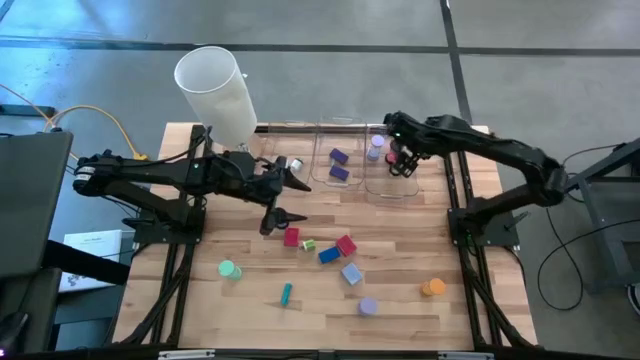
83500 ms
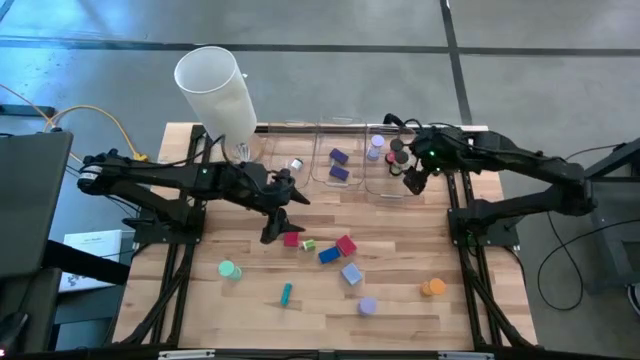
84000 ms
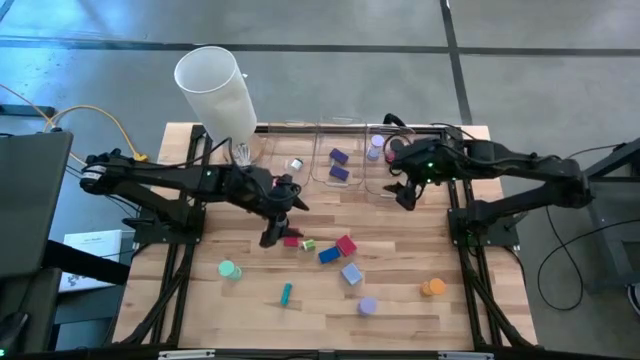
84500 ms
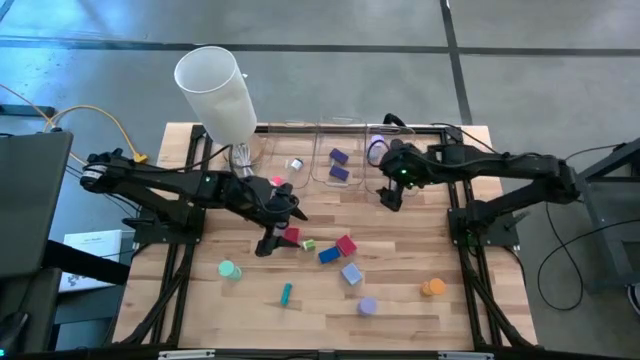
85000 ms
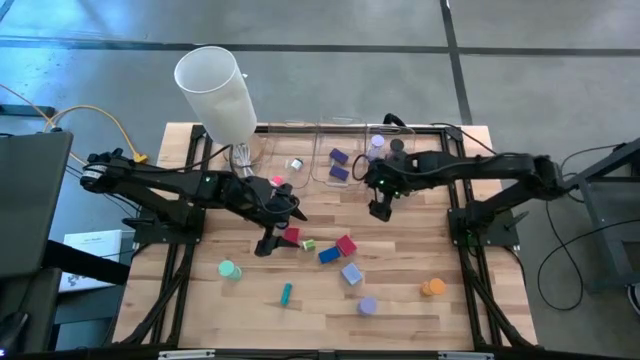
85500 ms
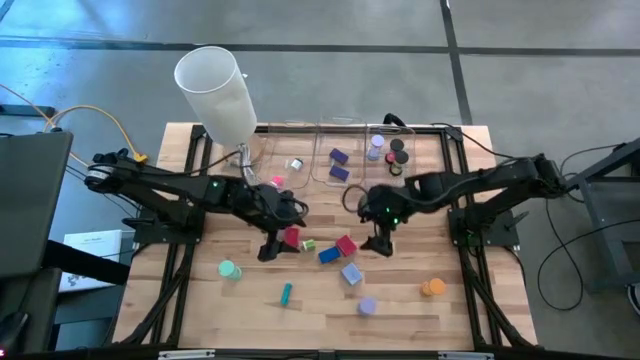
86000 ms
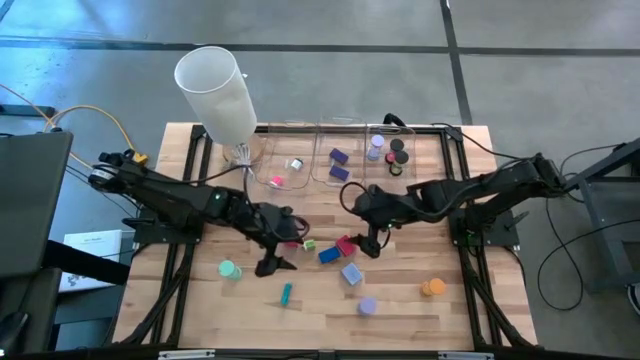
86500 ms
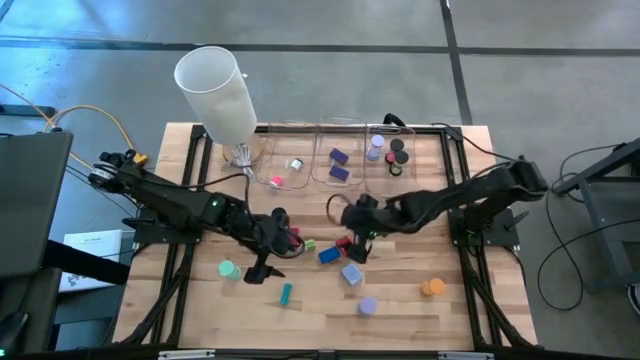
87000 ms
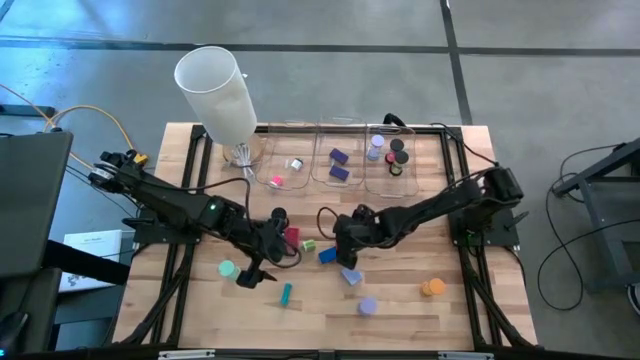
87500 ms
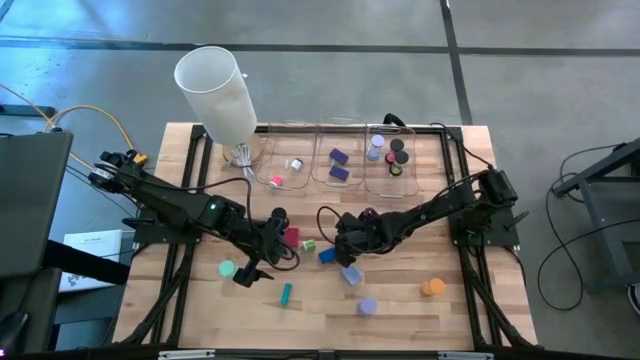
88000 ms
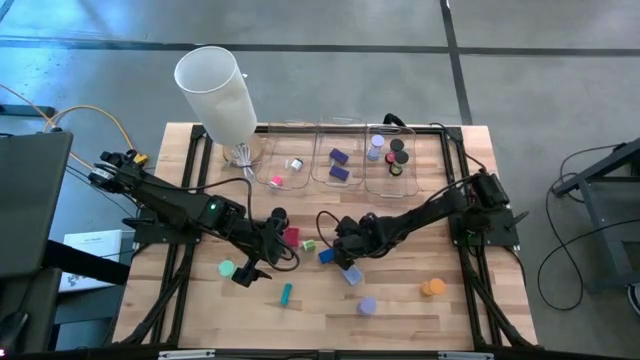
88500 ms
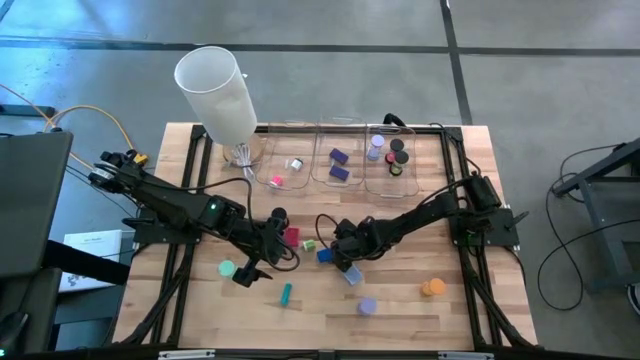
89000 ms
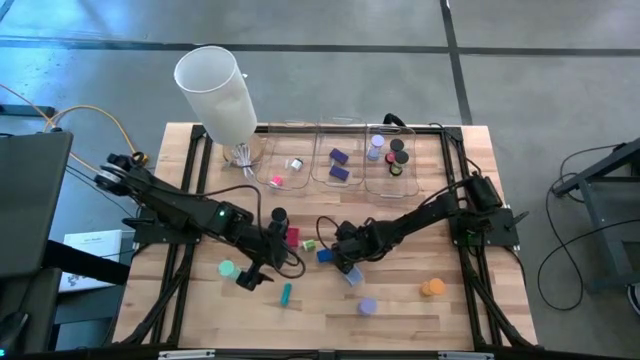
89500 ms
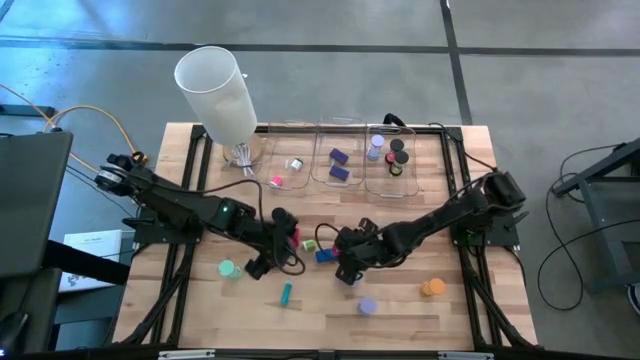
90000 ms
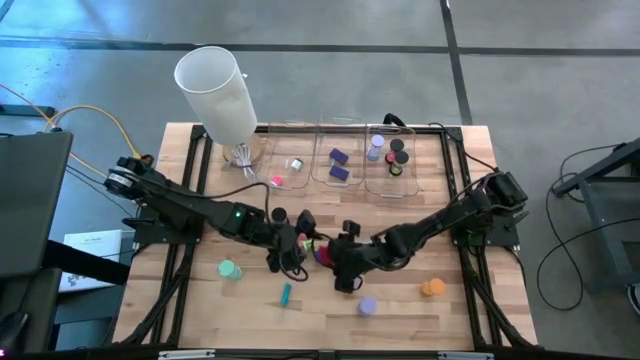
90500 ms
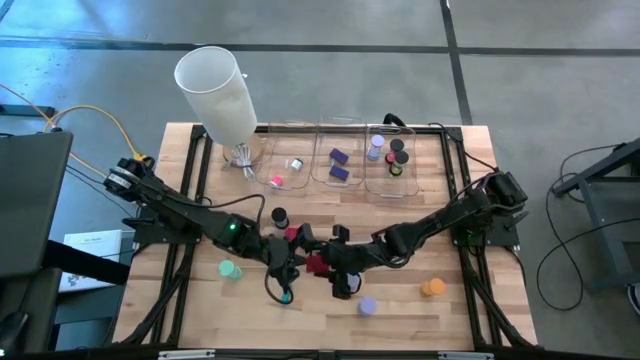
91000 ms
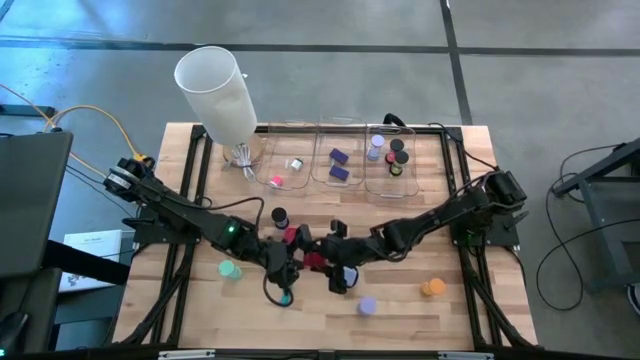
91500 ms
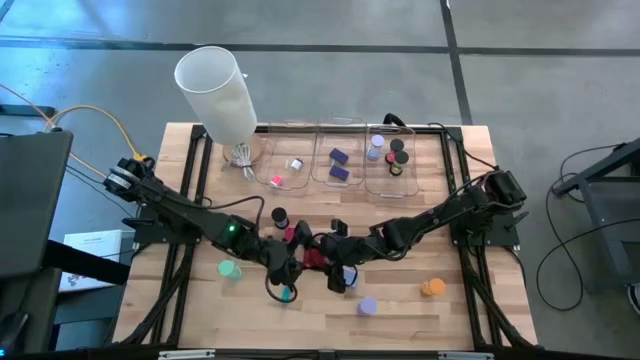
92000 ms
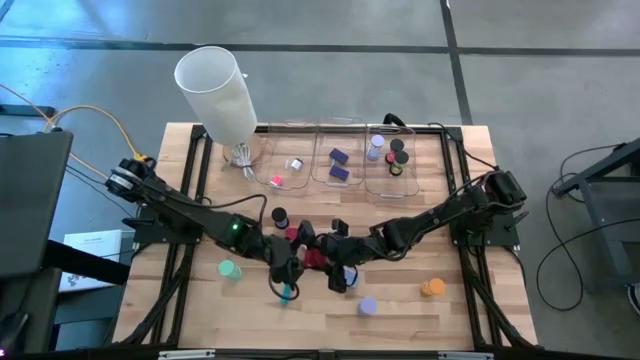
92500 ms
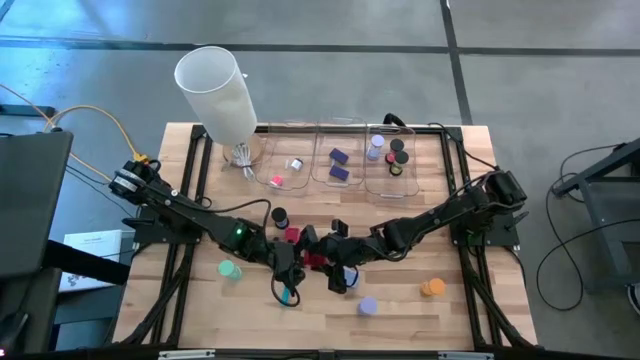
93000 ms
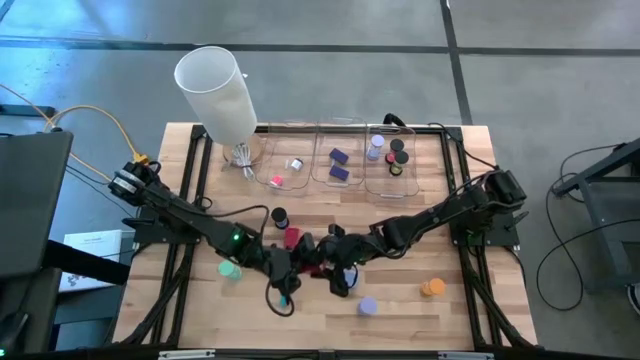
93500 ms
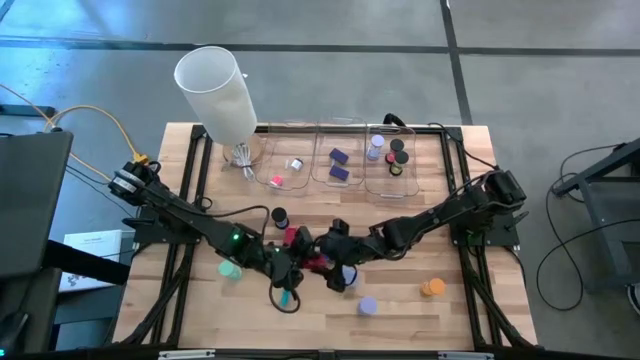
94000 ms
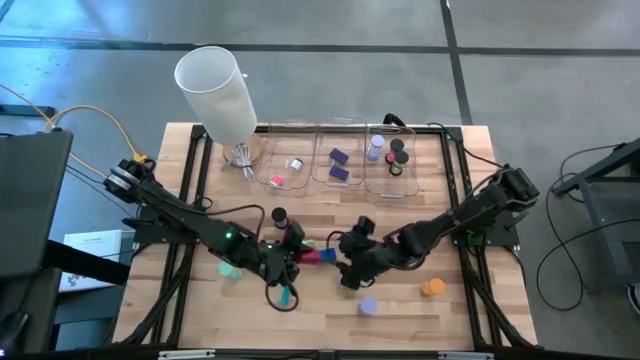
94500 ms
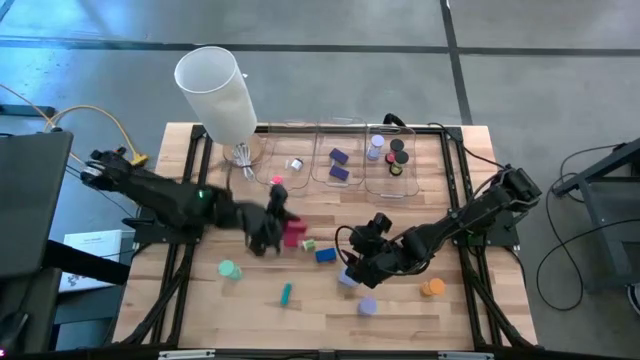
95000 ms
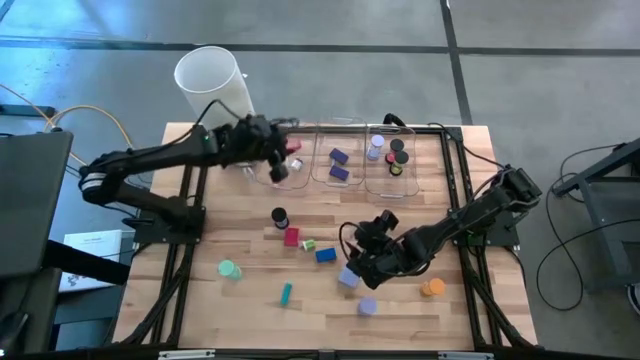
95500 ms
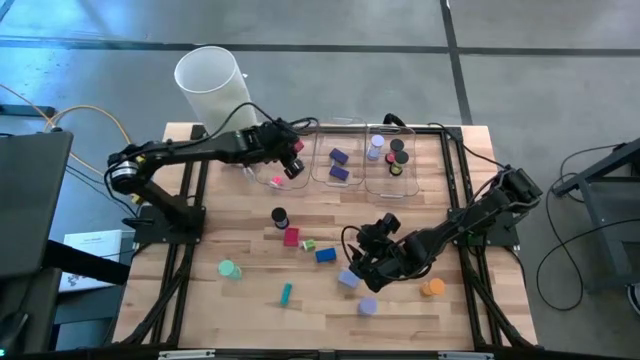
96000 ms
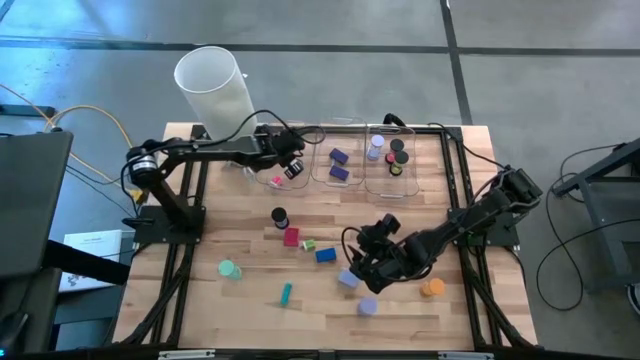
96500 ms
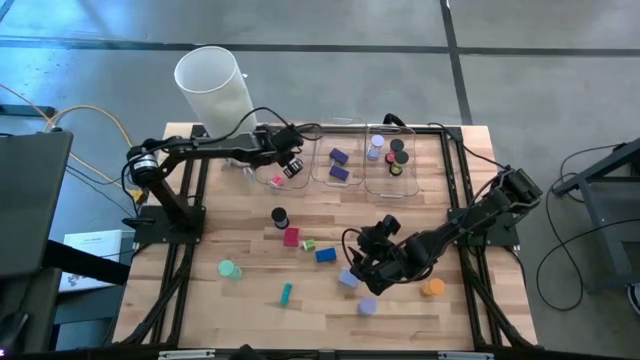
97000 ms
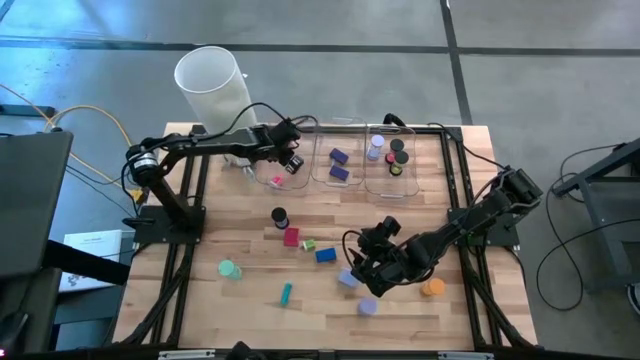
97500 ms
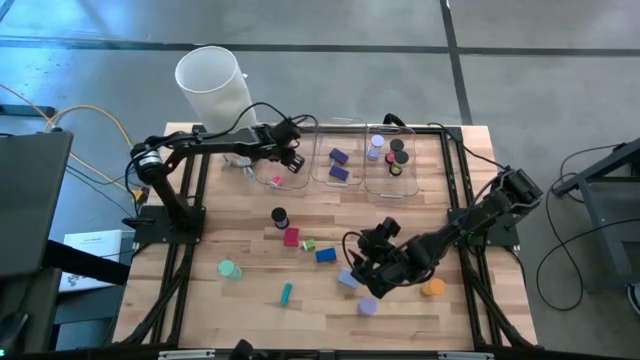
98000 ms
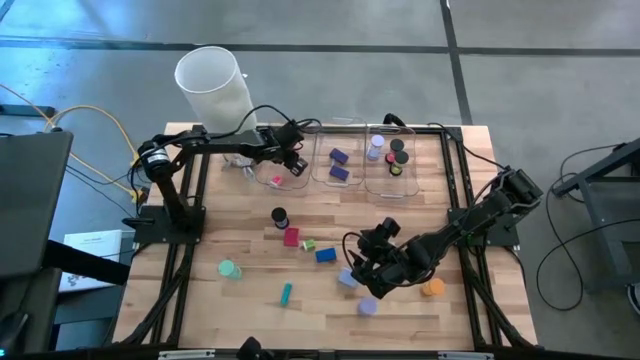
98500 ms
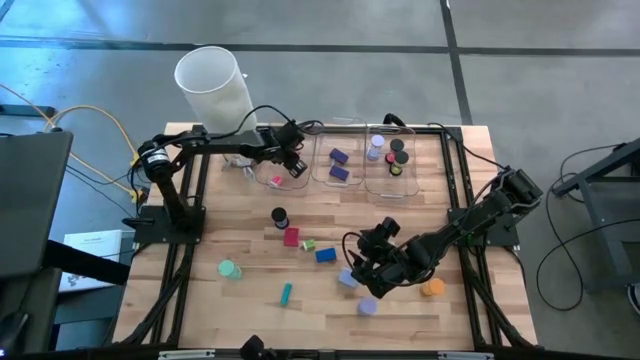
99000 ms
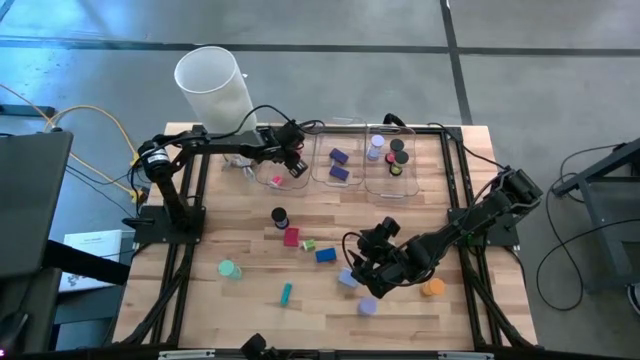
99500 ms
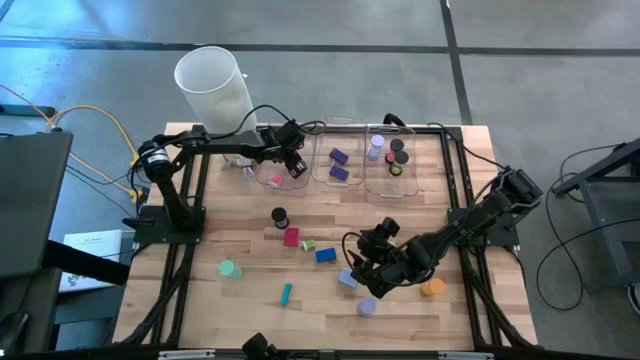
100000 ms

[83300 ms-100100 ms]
Task: Pick & Place Office items
Put the right red charger adapter into the left transparent bin

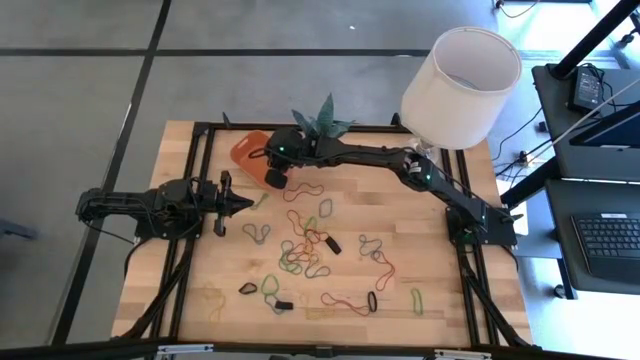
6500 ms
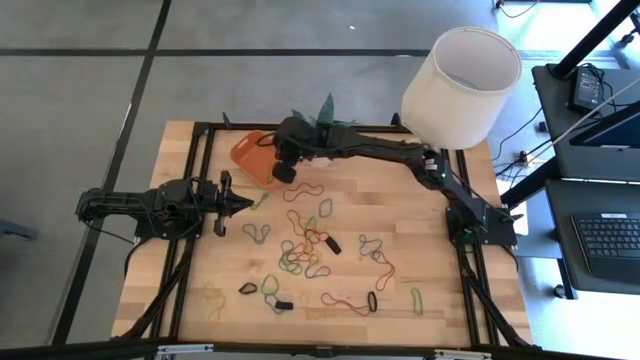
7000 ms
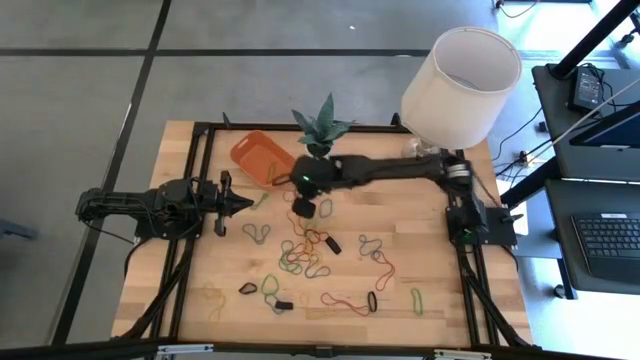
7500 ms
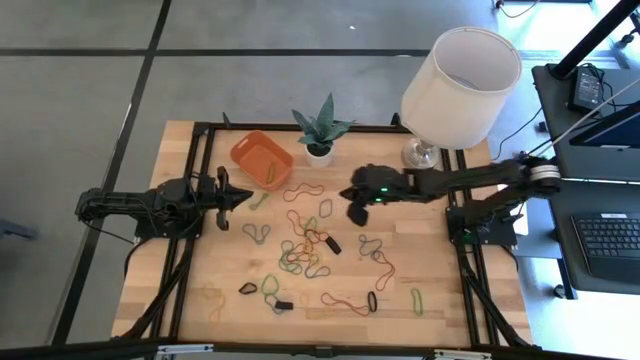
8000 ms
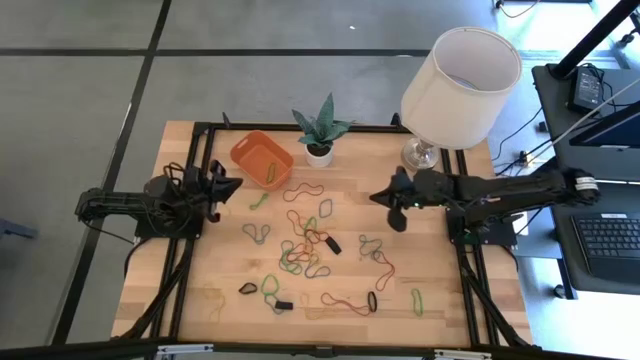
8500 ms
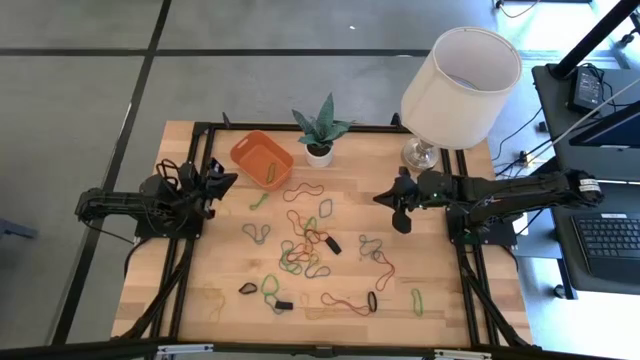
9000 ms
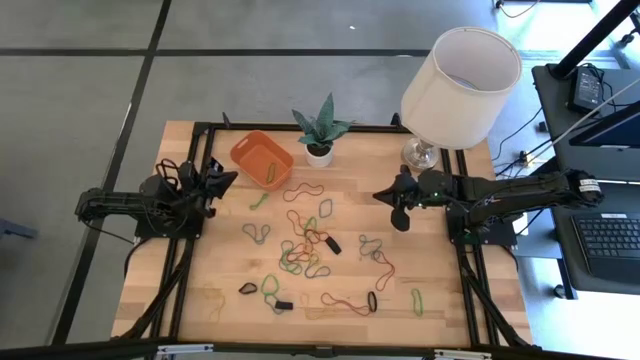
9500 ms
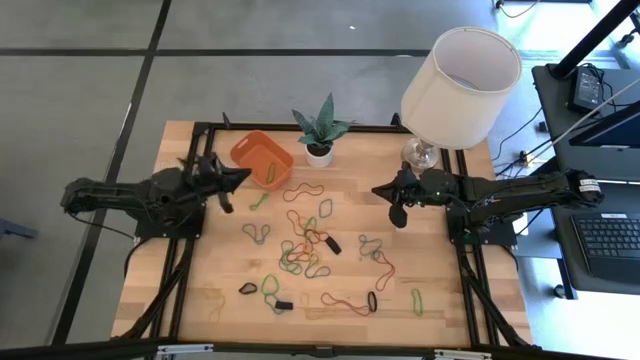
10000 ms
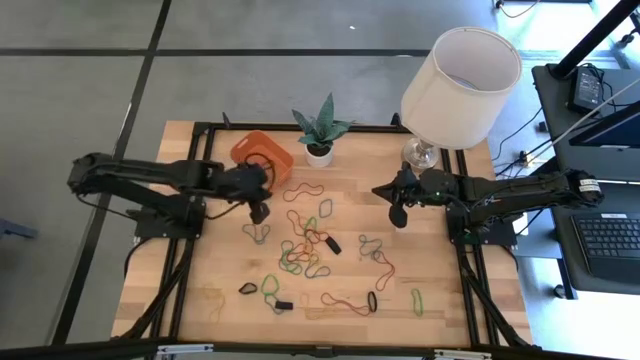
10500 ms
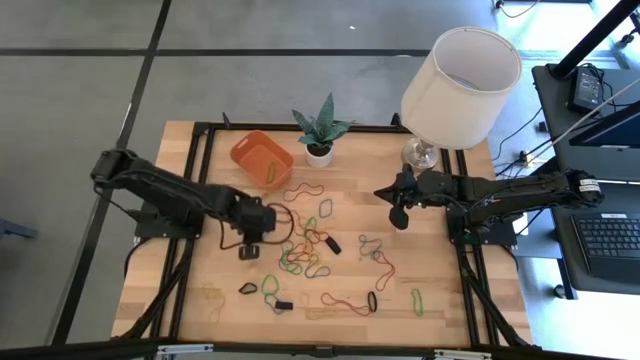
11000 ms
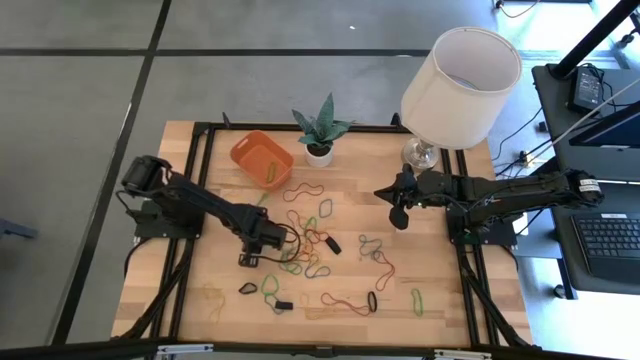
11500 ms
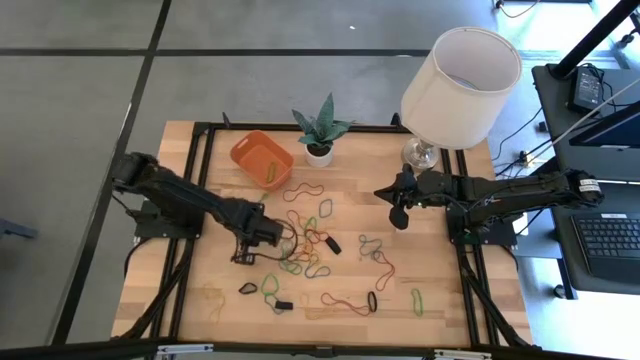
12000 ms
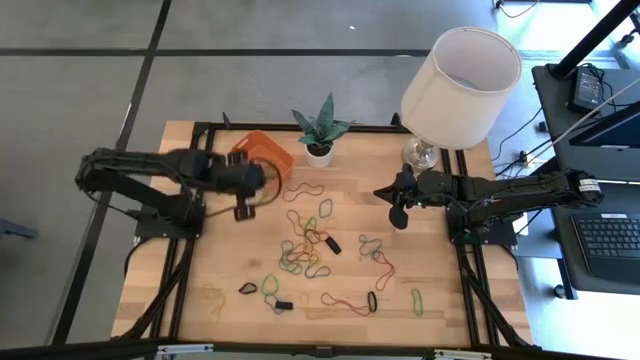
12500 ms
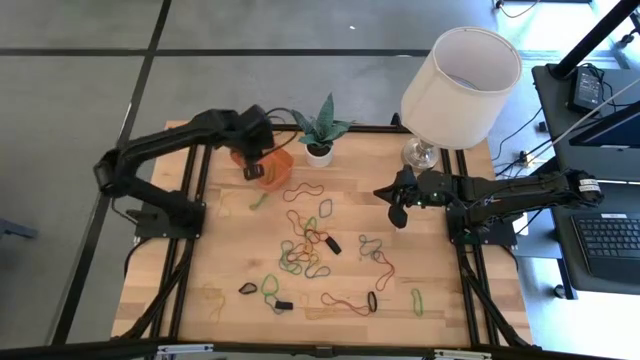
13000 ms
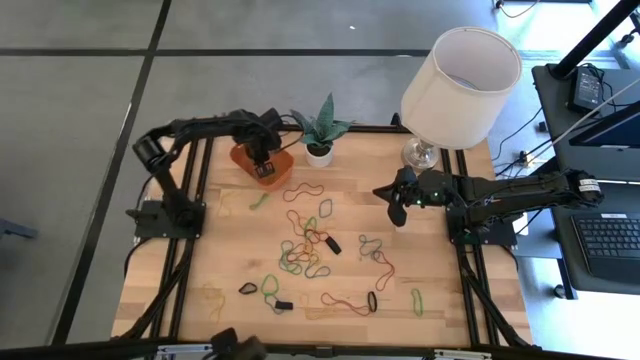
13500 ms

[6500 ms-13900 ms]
Task: Pick and place rubber bands into bin
Put the blue rubber band into the orange bin
